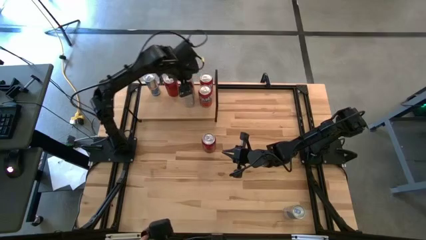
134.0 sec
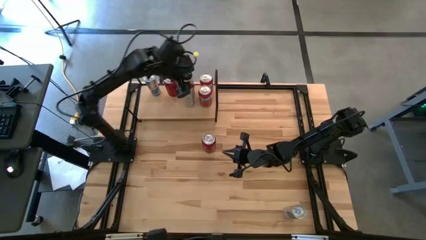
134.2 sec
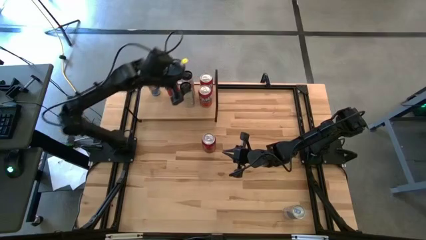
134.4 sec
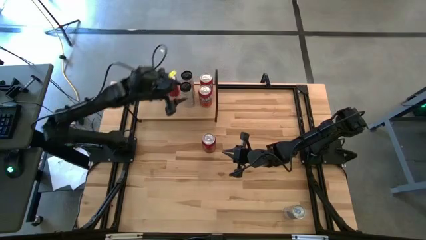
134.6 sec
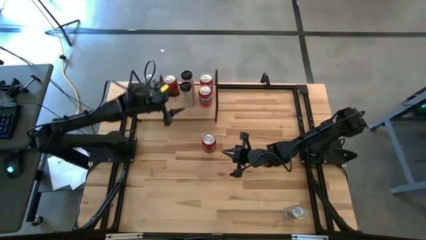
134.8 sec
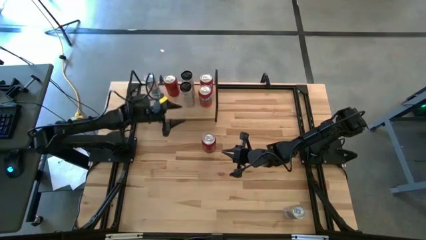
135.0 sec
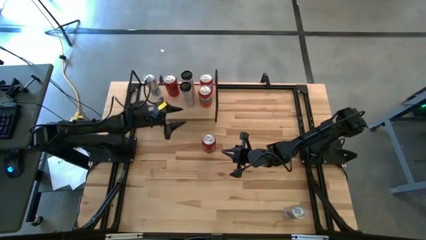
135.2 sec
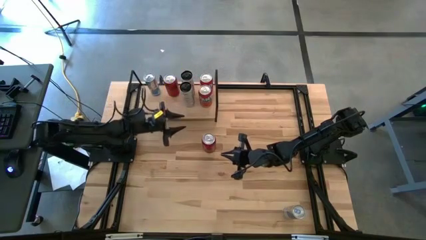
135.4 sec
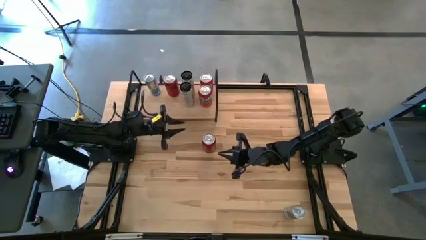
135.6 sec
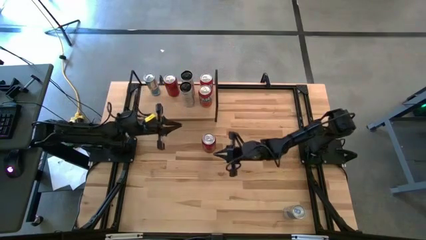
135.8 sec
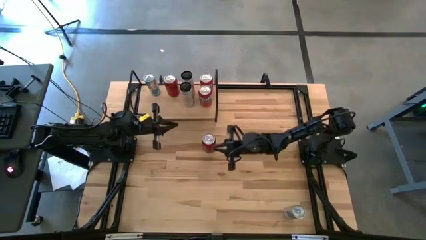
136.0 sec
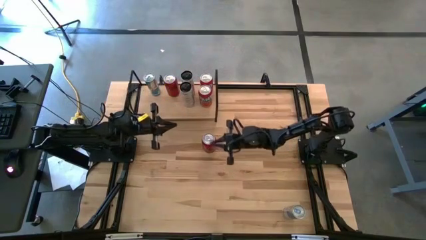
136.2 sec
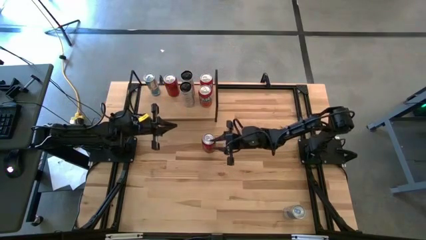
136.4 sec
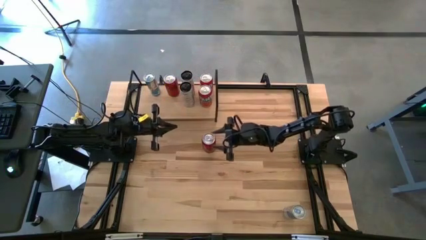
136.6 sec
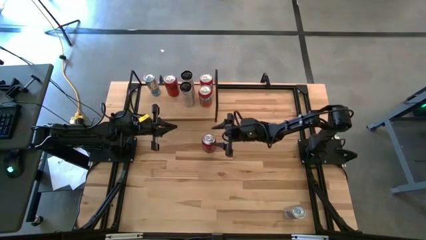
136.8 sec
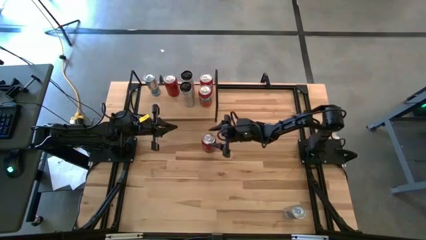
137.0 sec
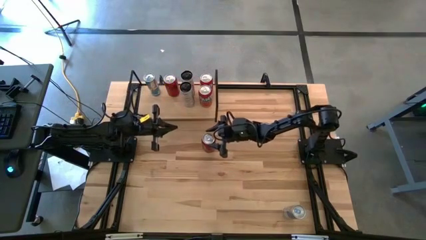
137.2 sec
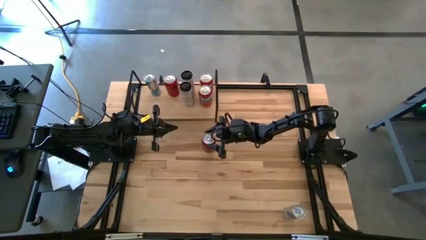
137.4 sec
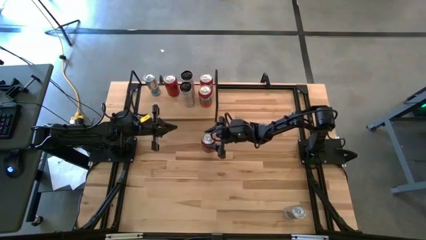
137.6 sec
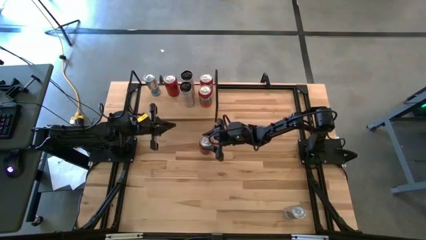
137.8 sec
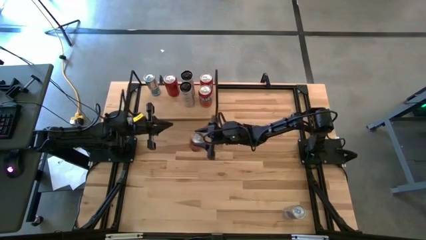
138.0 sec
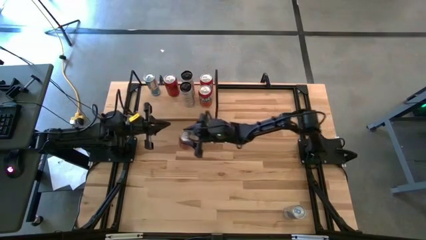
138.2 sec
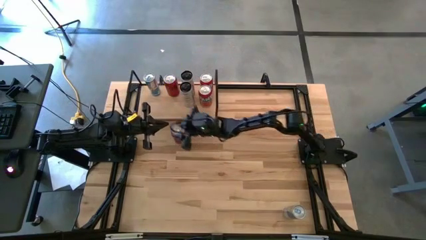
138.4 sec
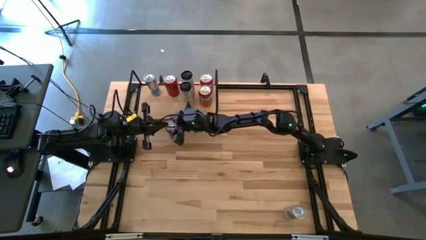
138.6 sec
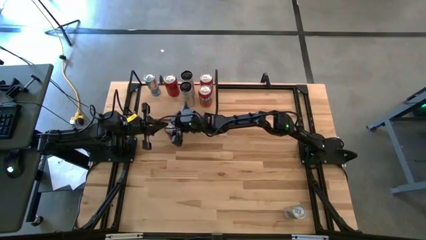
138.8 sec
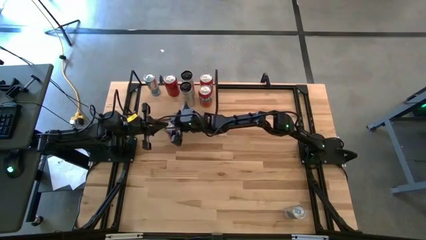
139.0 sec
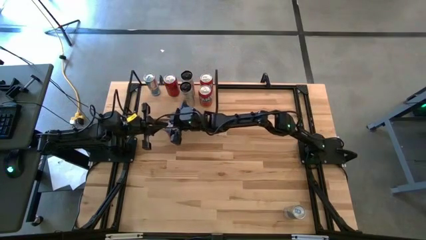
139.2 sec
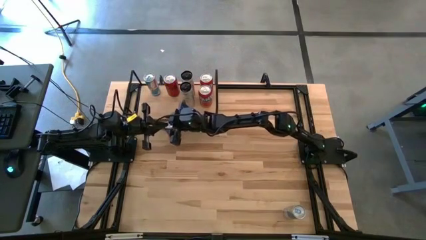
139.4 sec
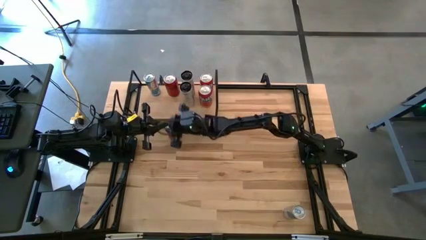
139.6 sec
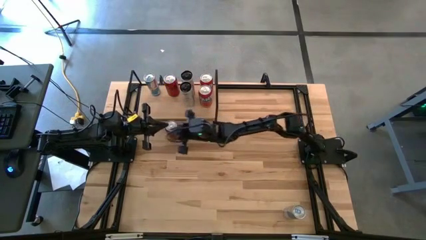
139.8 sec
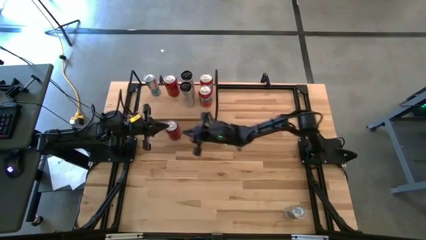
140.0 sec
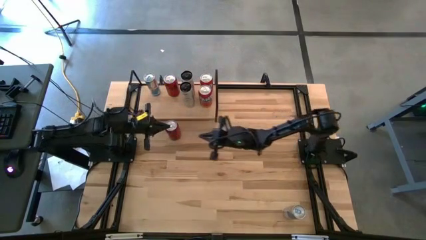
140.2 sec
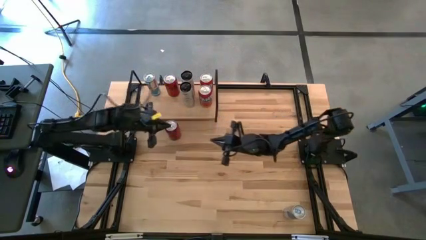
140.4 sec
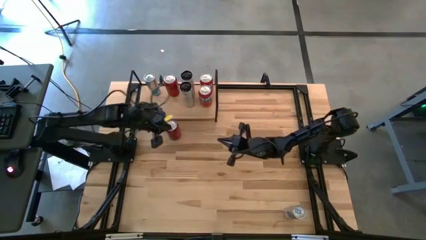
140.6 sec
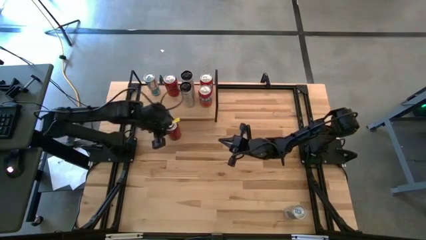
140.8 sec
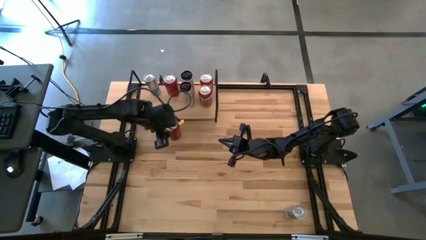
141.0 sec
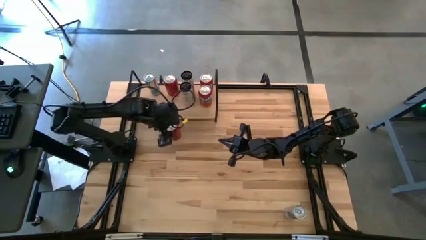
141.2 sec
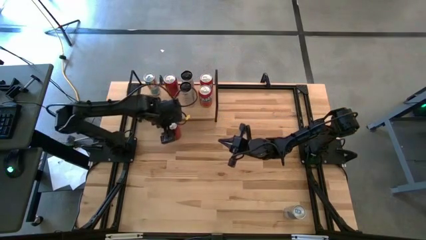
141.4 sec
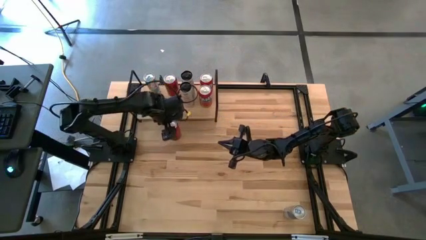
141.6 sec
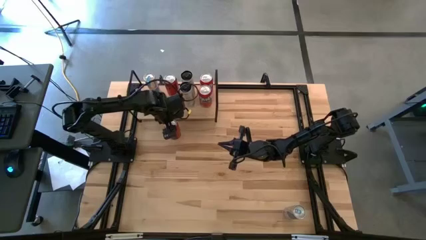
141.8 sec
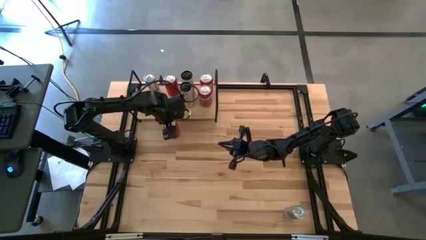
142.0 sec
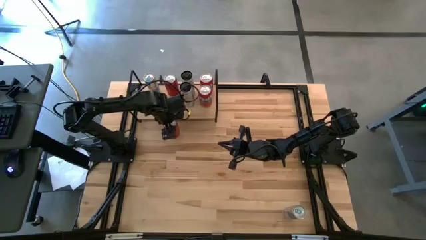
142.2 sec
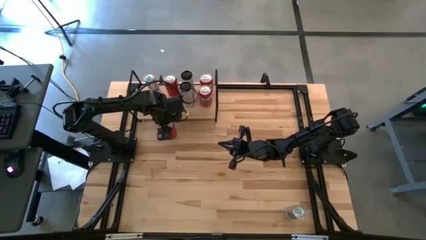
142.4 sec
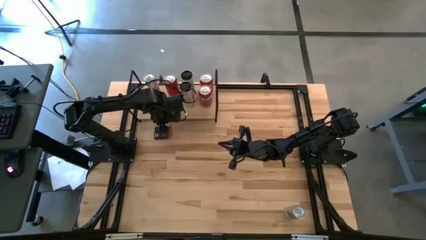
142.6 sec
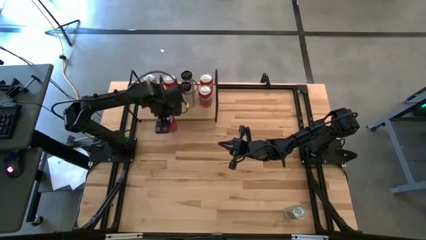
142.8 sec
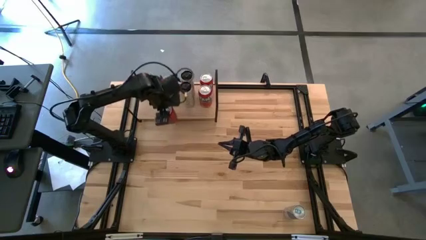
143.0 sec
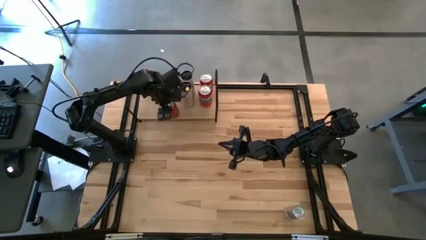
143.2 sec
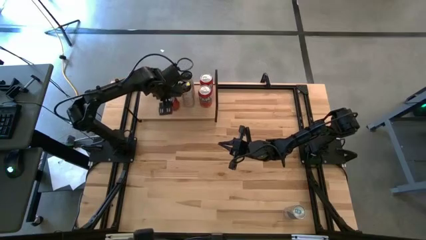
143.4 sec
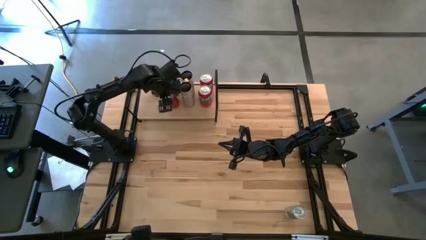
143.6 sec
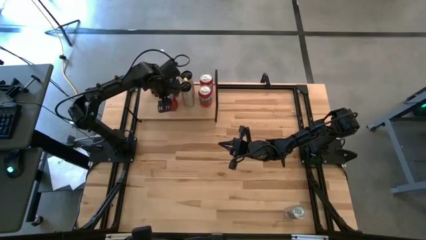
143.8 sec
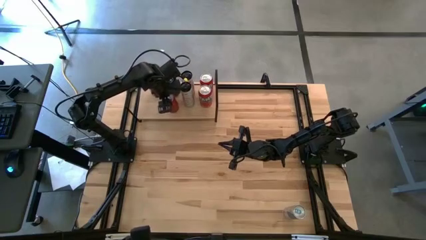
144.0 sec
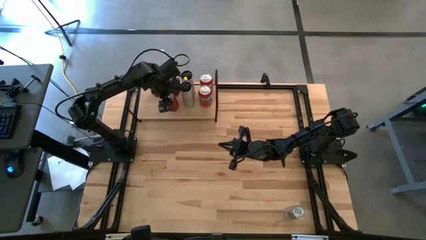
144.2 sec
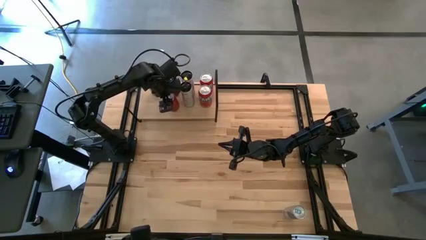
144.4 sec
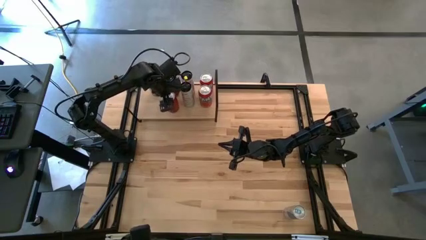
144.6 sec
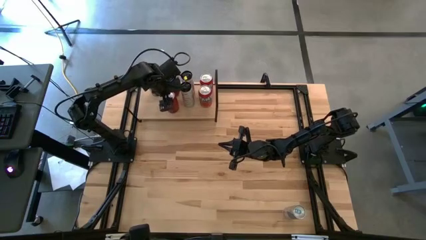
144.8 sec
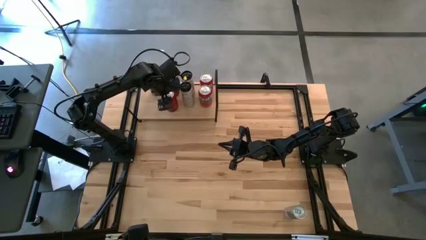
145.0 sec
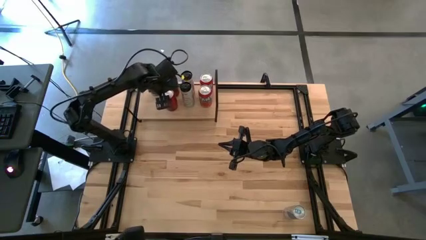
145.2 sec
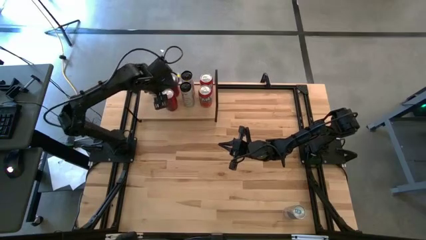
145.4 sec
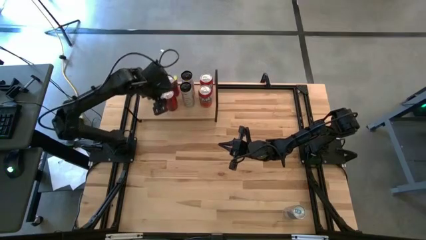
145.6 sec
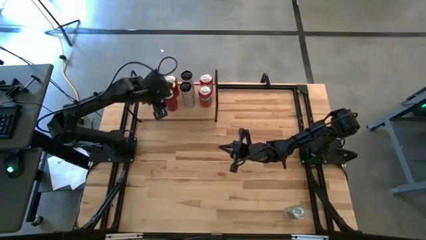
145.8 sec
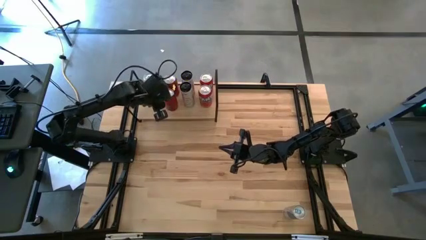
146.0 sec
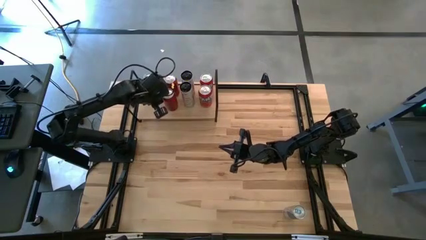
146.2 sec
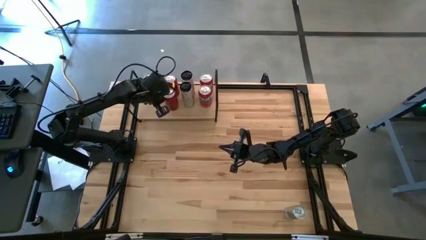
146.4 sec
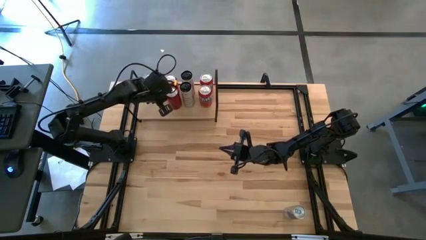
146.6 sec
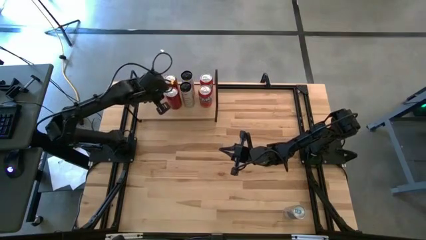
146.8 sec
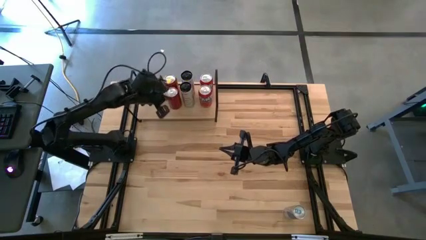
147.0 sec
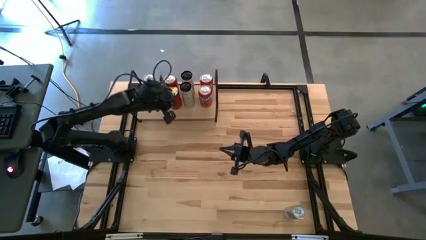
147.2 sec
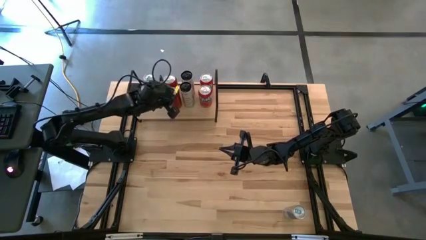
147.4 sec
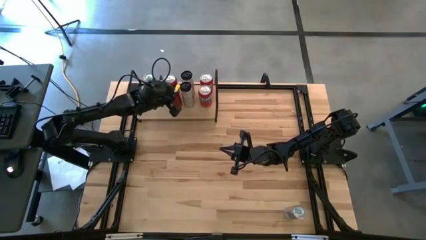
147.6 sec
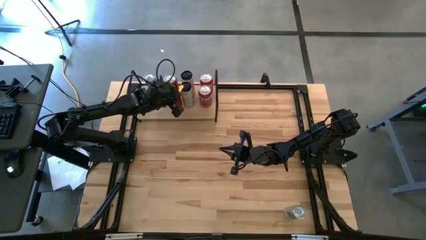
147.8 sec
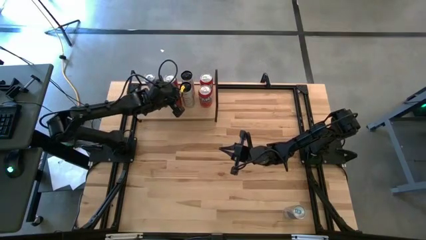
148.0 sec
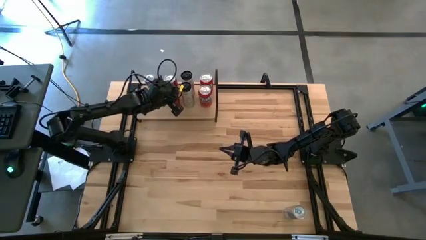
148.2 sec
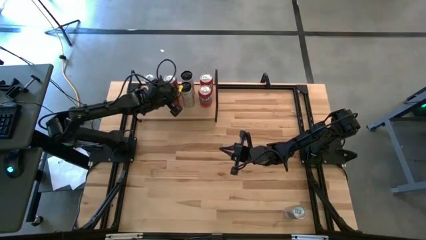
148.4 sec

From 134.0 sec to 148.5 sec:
Task: Place canned beverage on shelf
Put the red black soda can on the shelf aligned with the other red black soda can on the shelf
